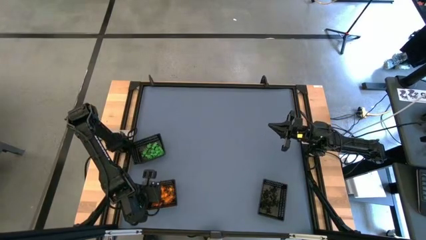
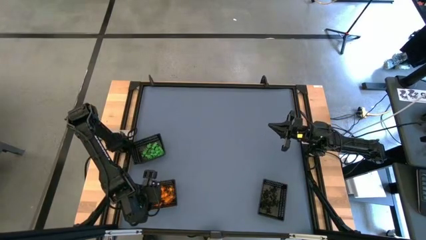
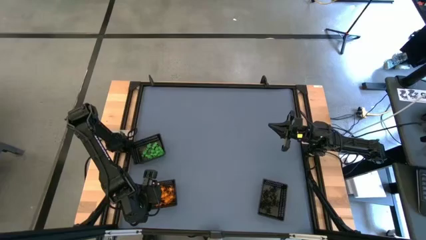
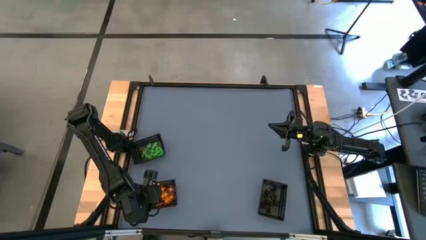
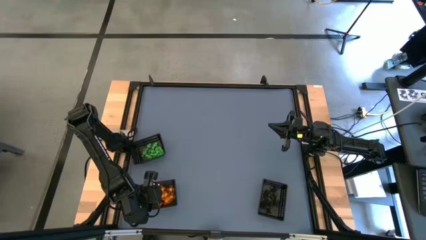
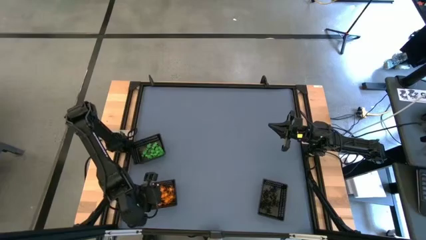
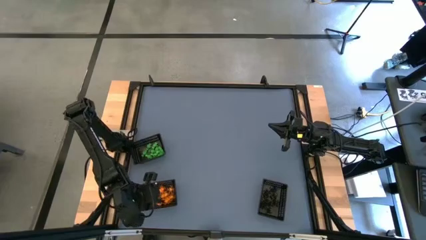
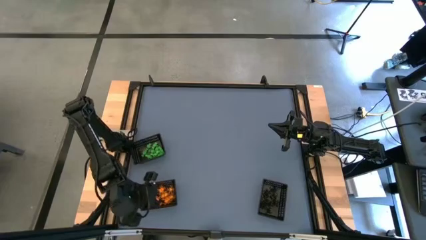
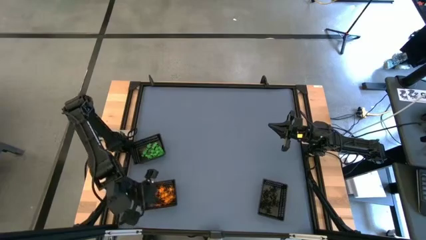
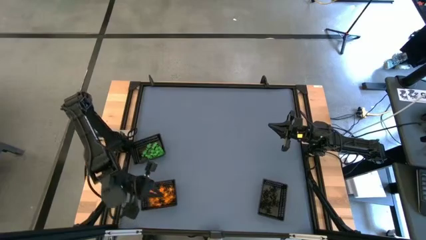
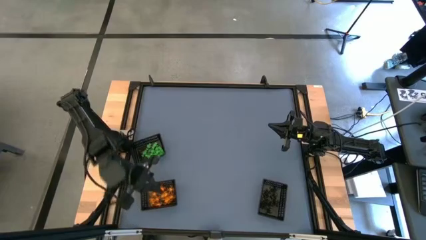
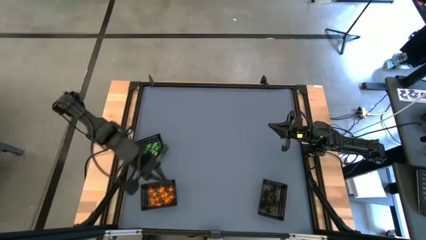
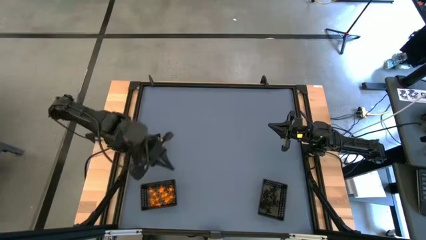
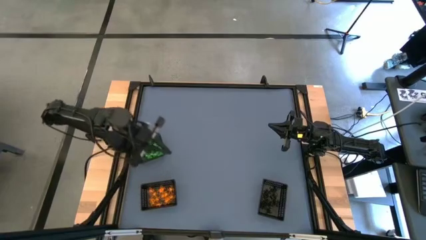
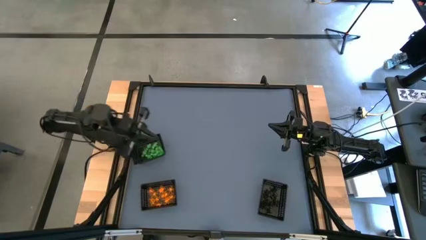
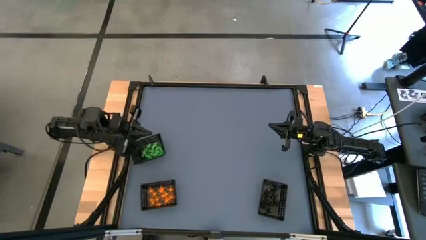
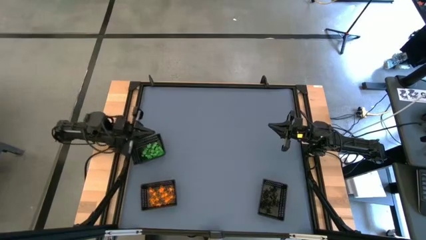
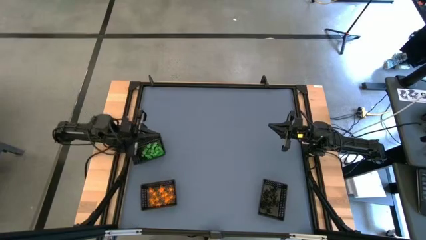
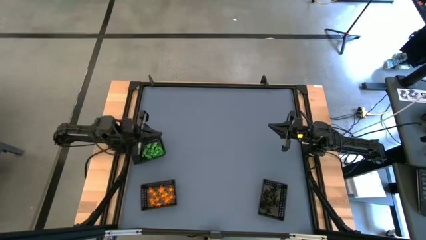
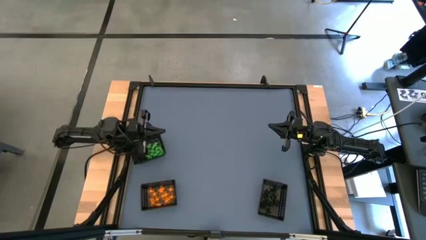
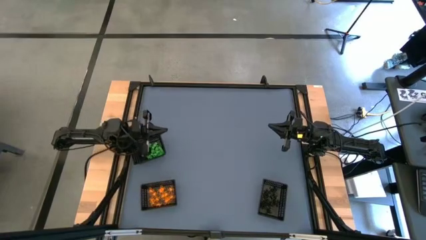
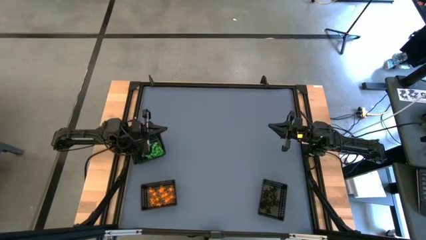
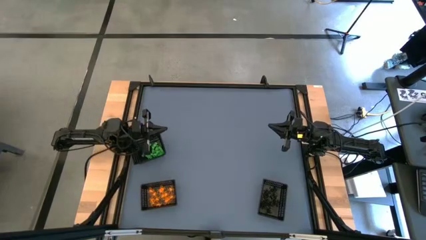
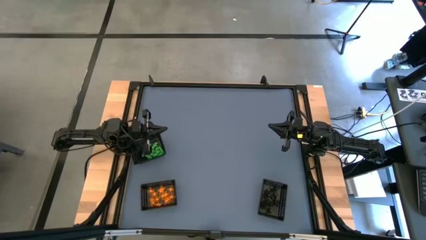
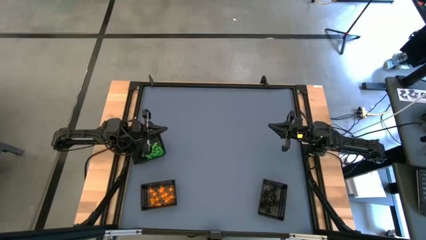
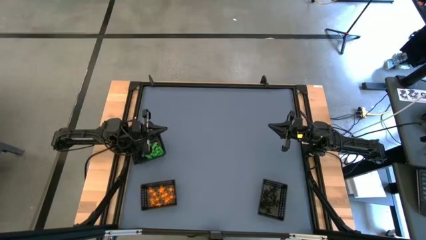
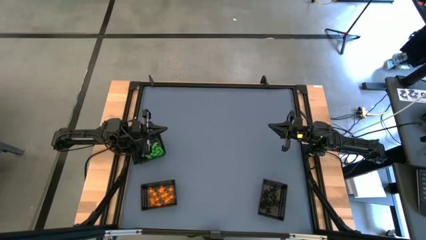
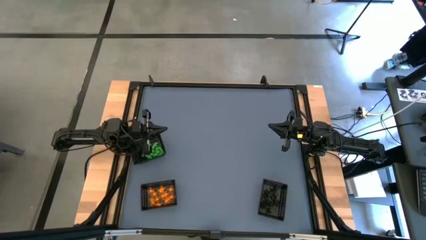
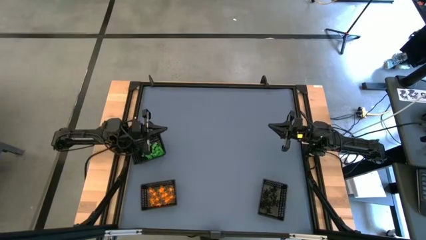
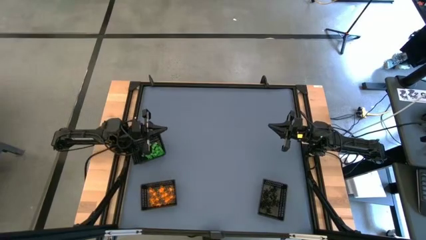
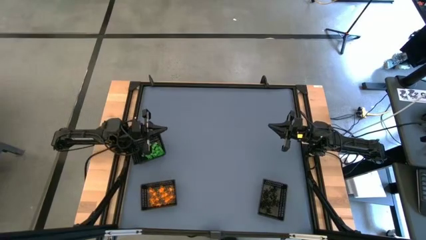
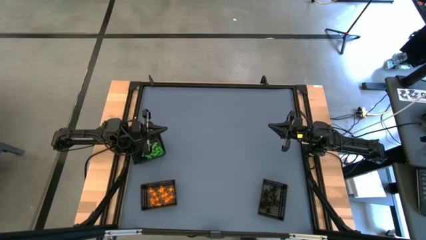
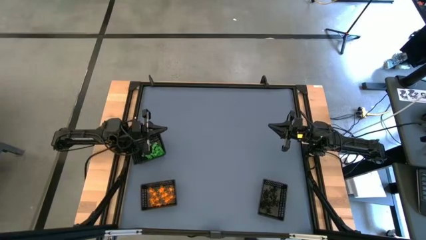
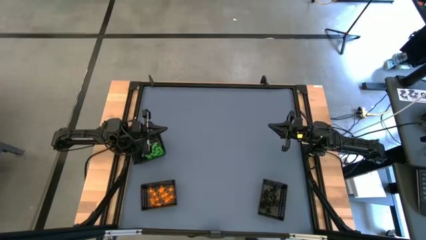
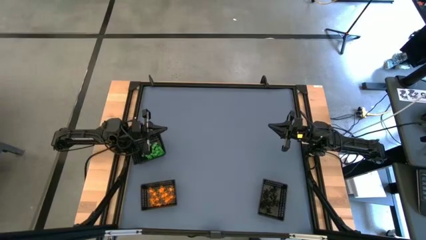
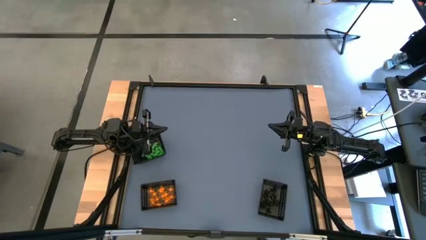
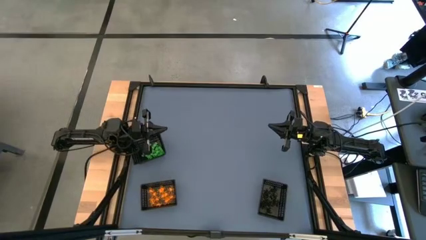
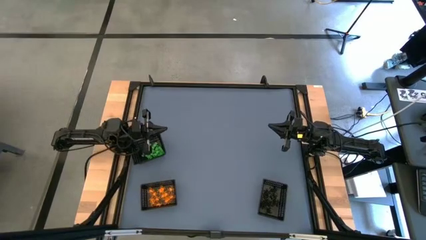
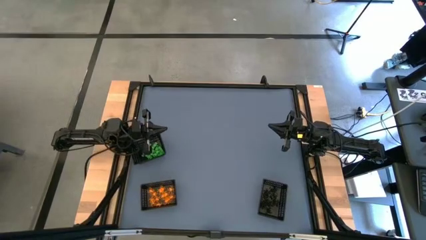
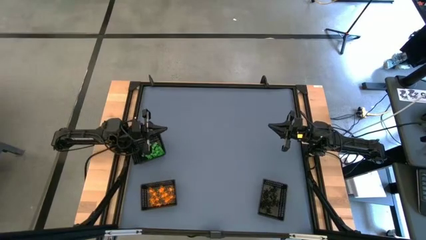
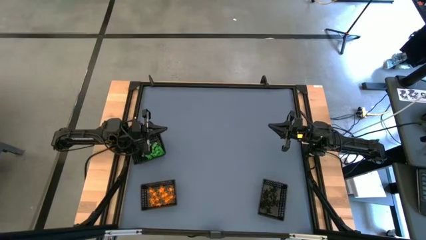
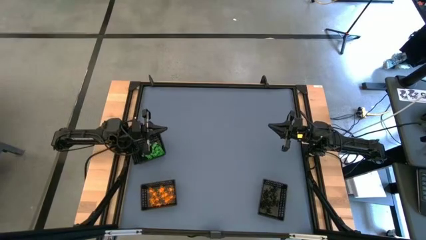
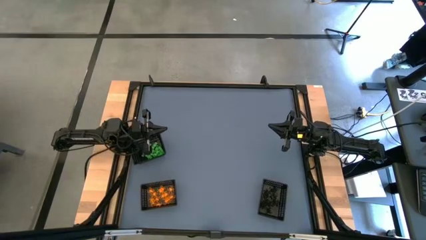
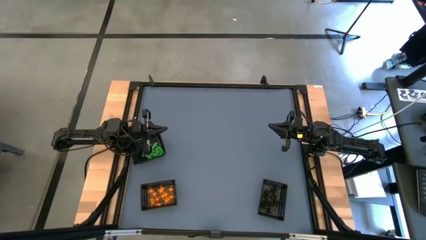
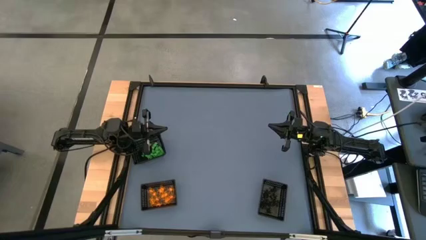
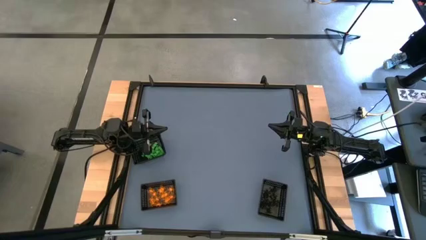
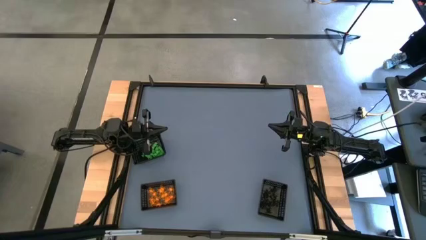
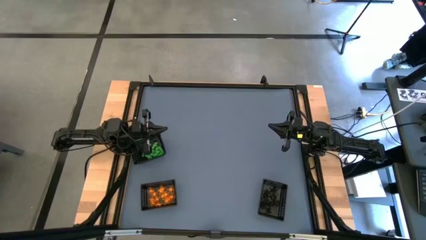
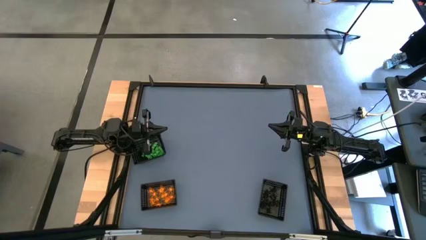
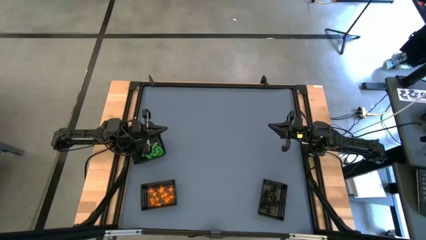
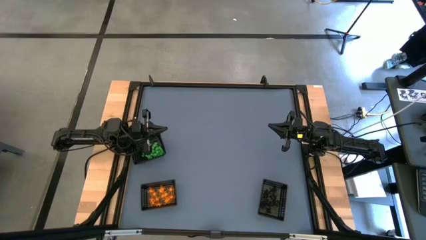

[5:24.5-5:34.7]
Task: Sort Halloween decoration
Return to Home Position

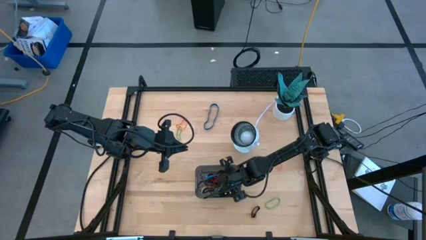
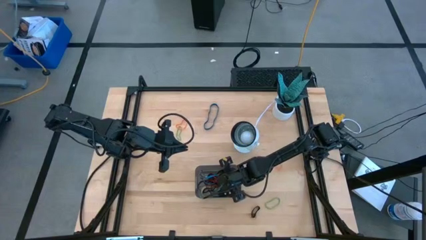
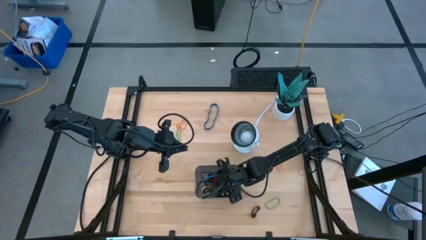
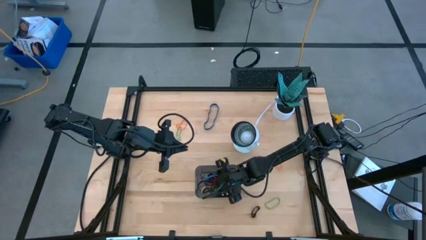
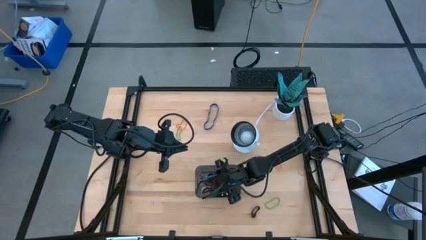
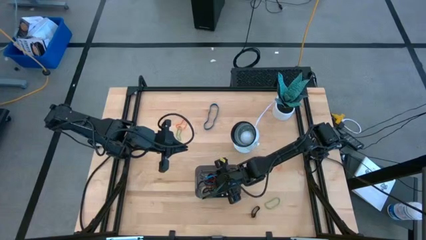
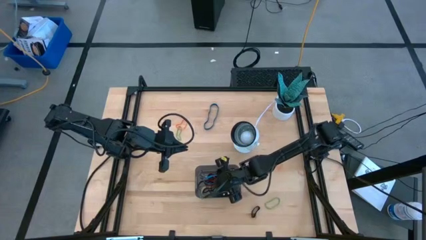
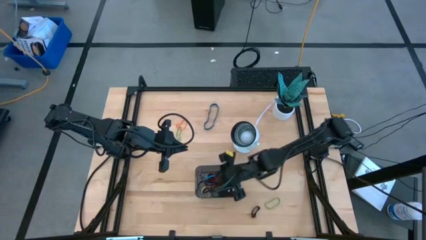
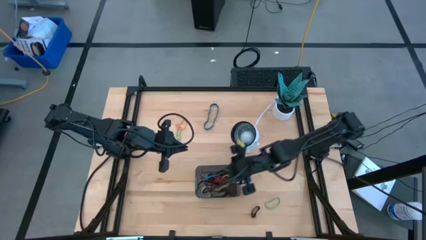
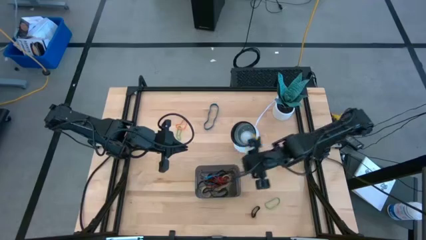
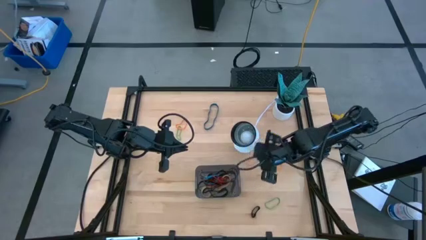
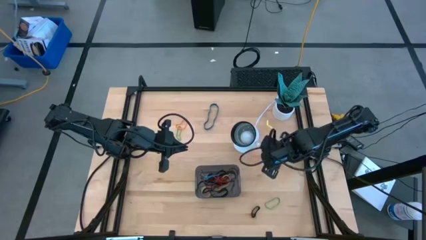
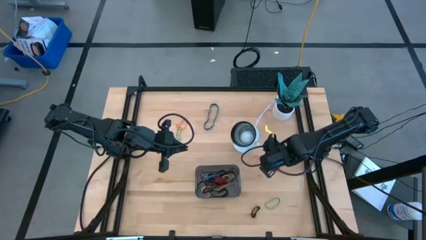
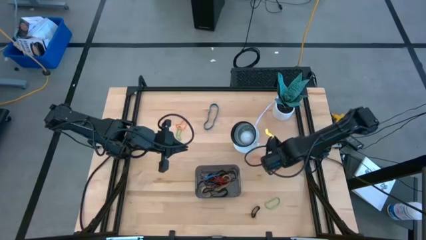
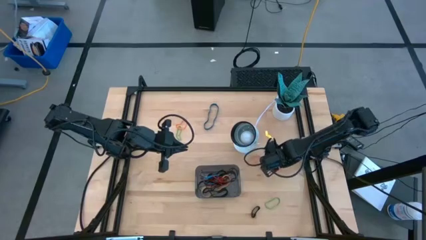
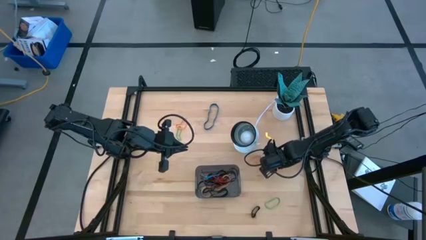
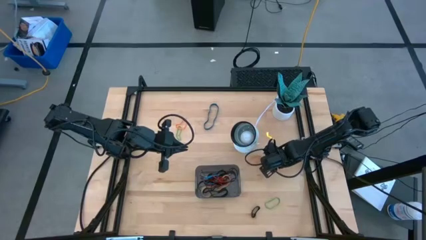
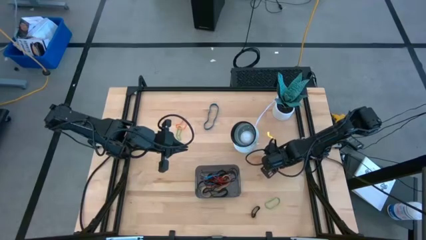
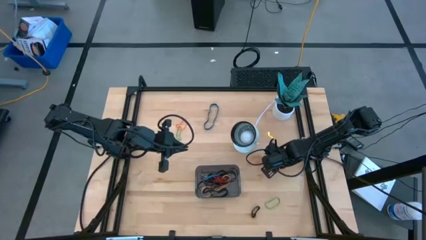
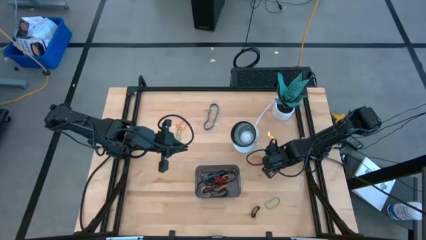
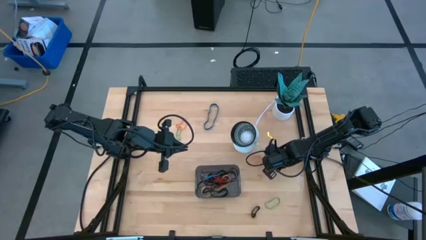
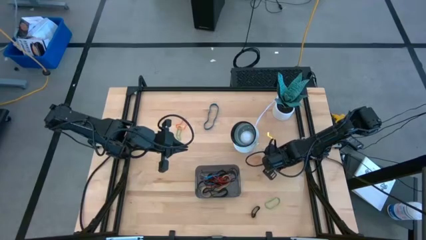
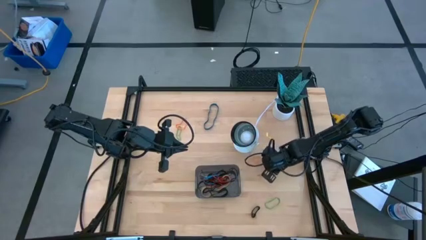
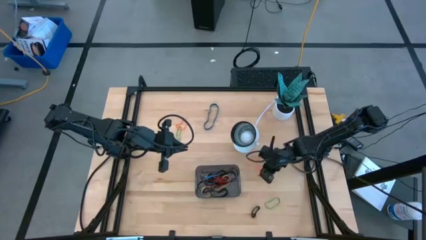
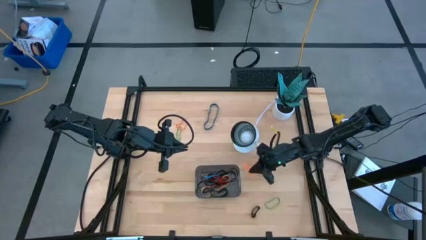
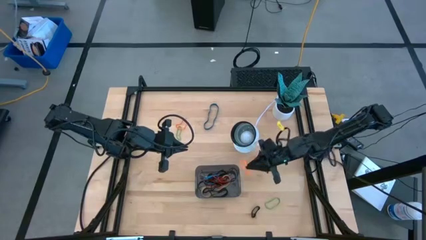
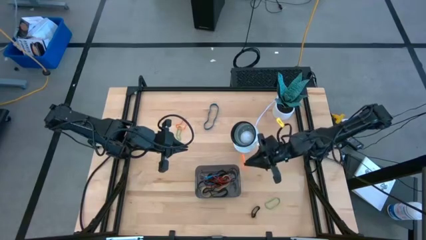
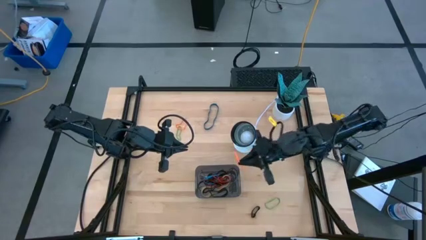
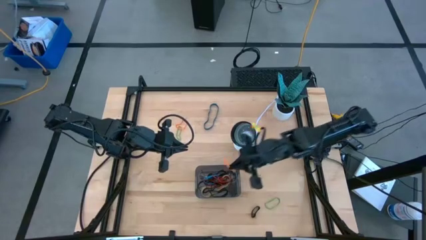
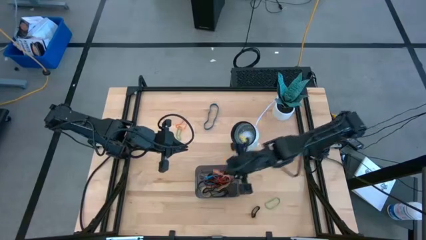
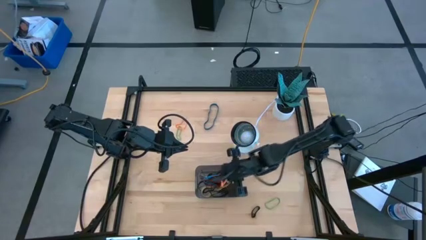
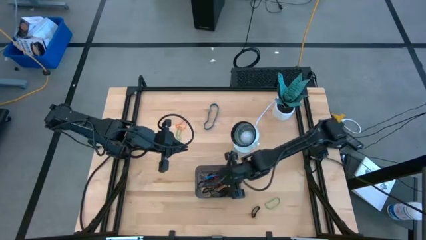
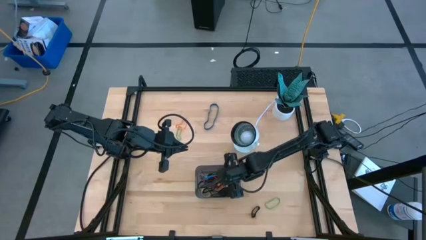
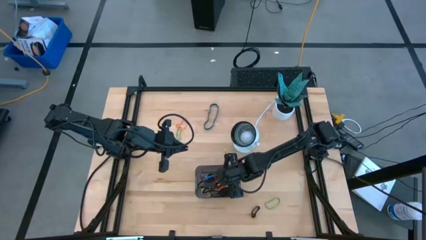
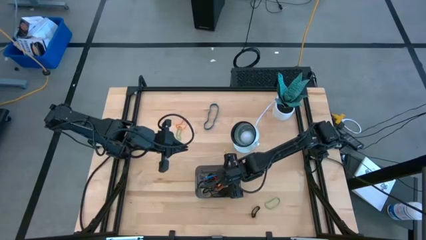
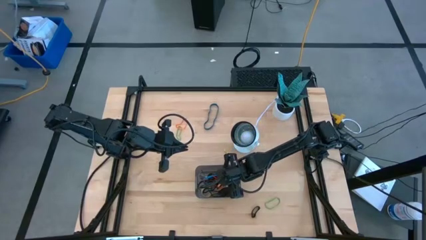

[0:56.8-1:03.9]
Task: Pick and place rubber bands into bin
Put the bottom right orange rubber band into the black bin
